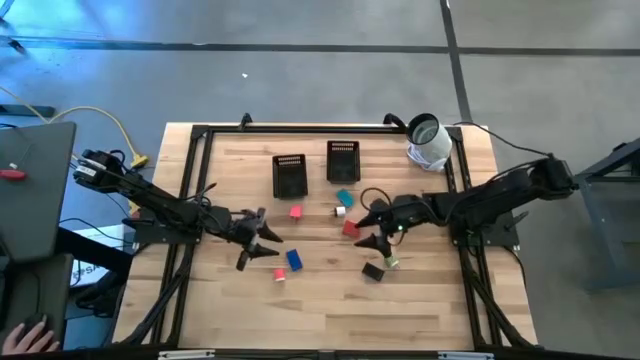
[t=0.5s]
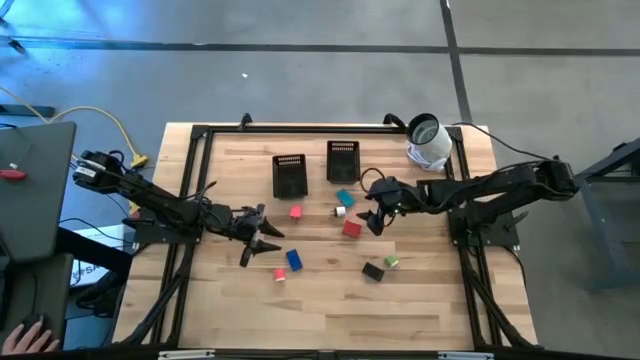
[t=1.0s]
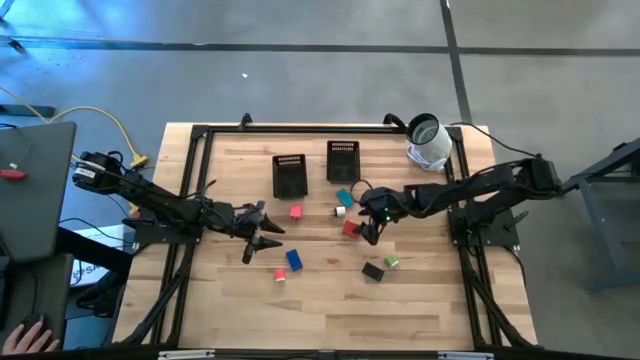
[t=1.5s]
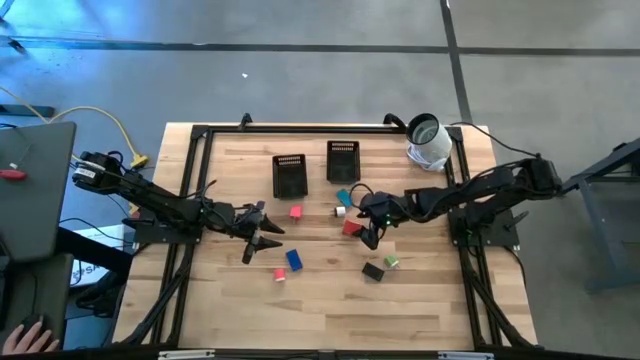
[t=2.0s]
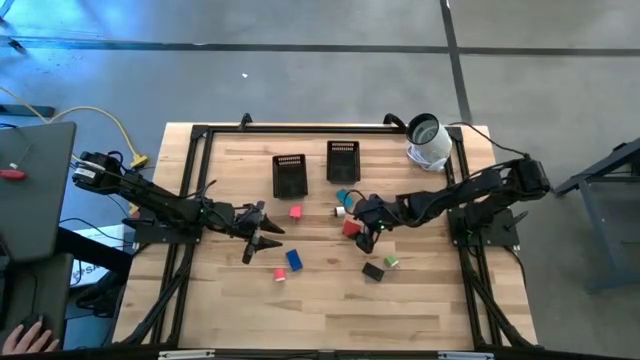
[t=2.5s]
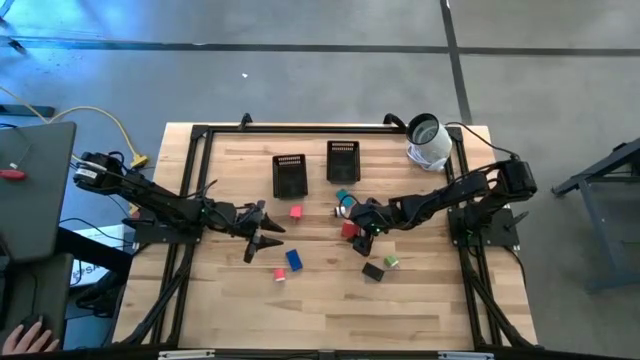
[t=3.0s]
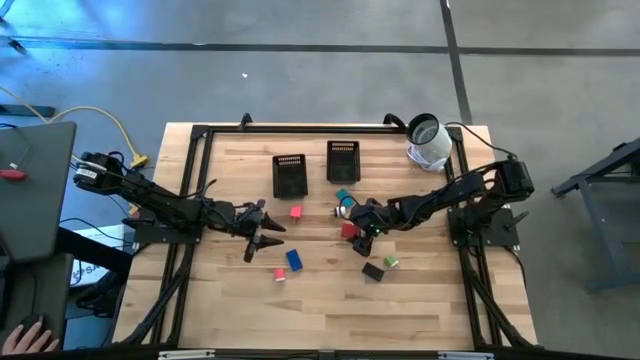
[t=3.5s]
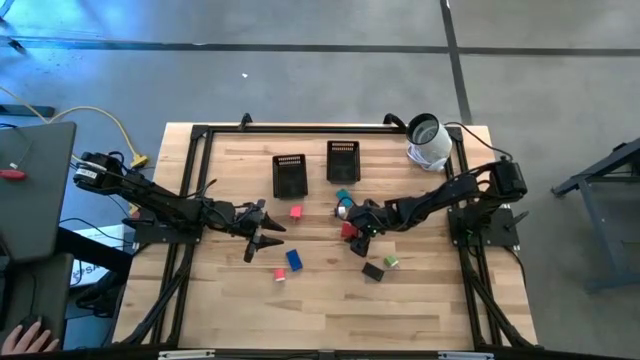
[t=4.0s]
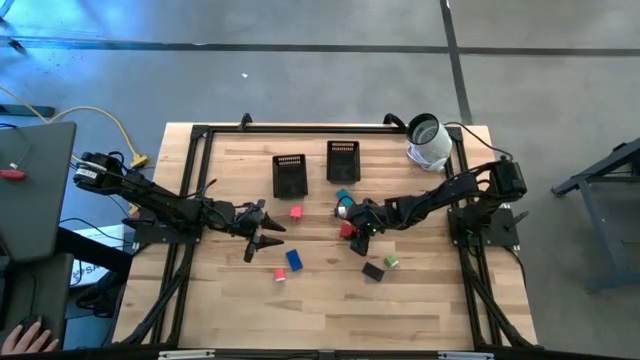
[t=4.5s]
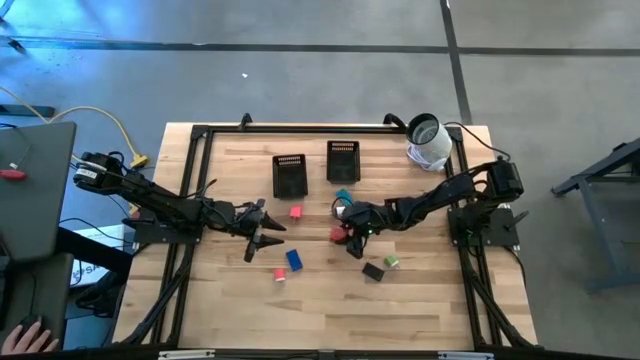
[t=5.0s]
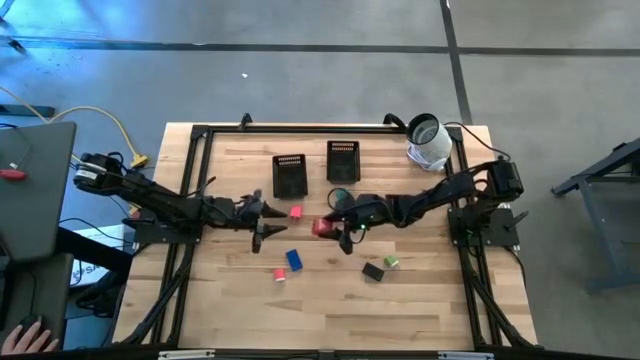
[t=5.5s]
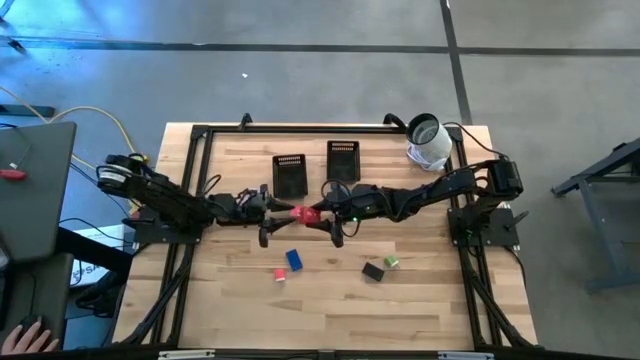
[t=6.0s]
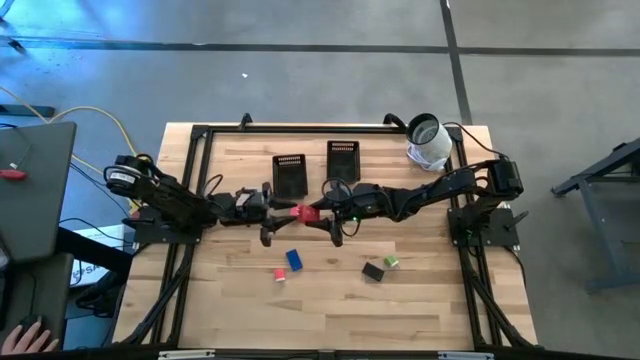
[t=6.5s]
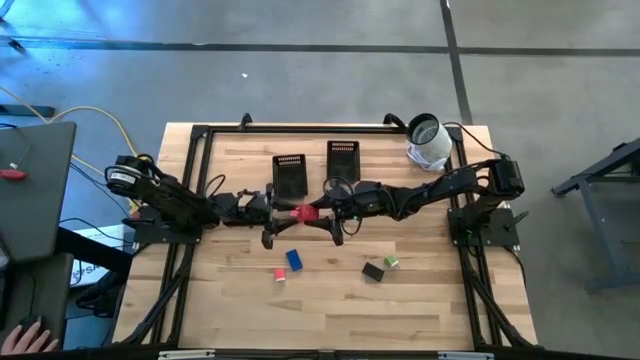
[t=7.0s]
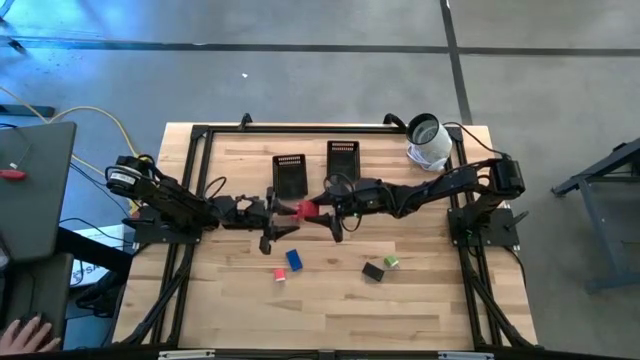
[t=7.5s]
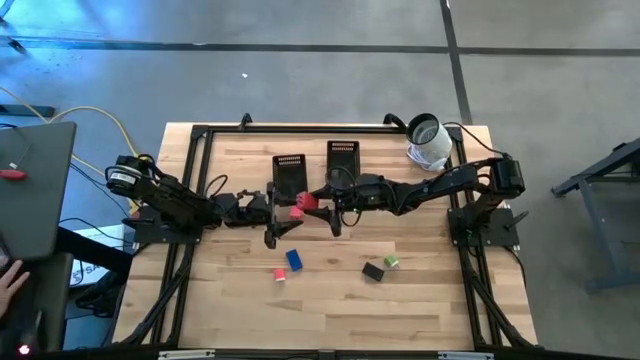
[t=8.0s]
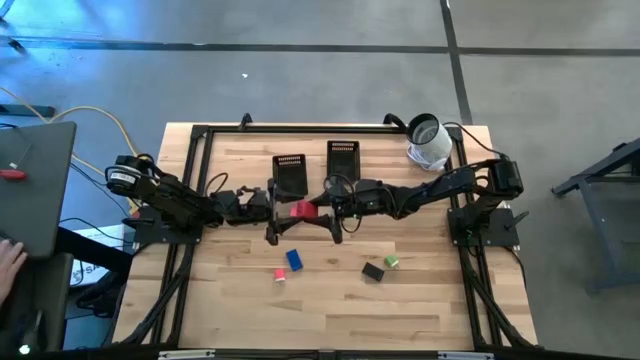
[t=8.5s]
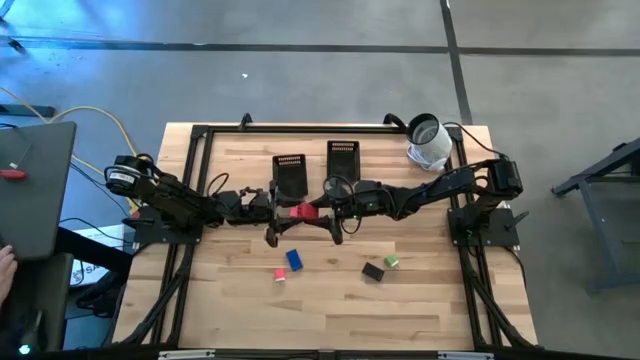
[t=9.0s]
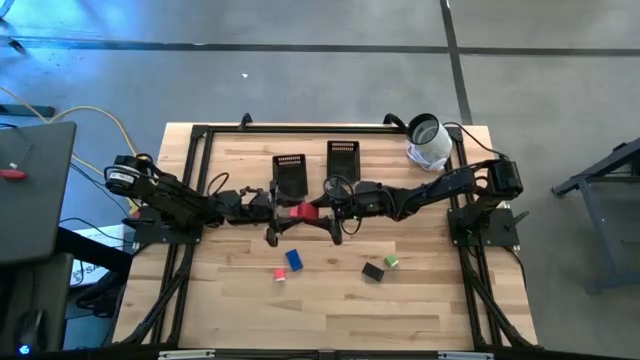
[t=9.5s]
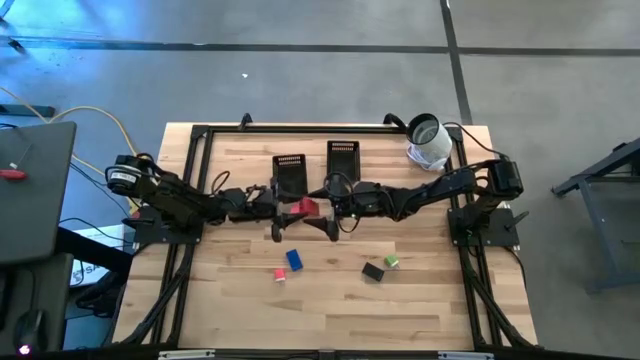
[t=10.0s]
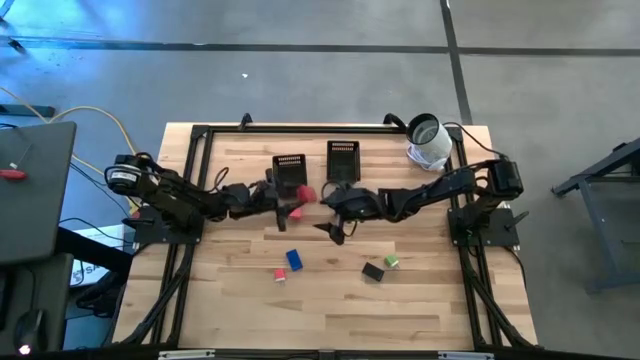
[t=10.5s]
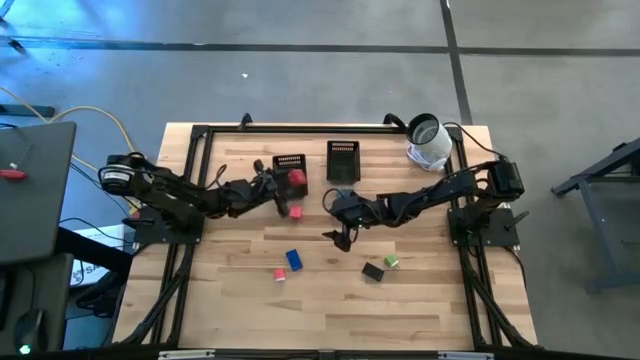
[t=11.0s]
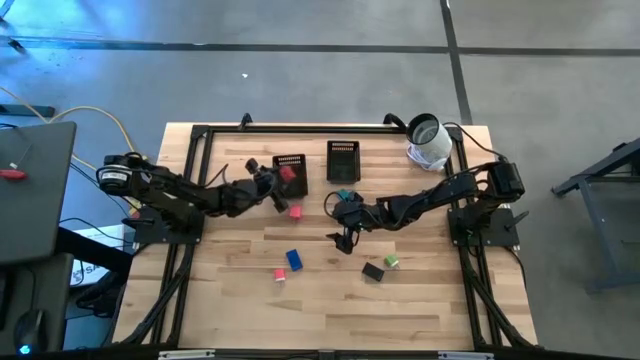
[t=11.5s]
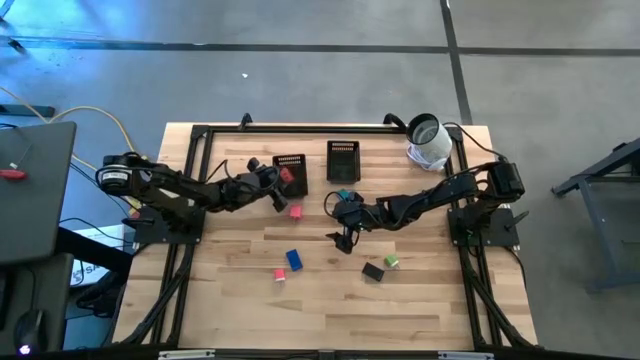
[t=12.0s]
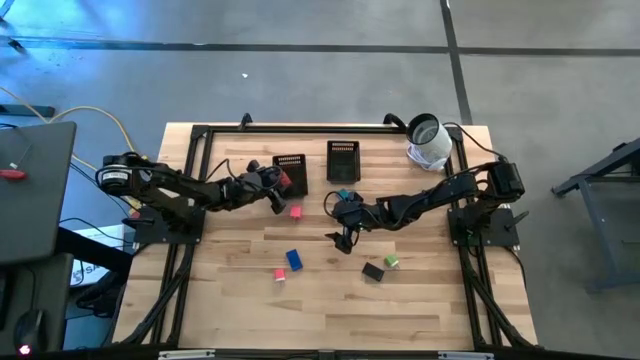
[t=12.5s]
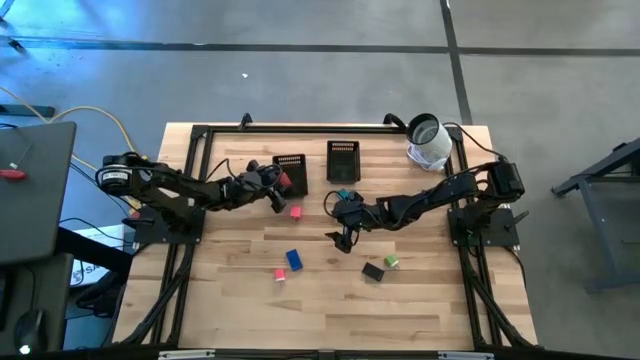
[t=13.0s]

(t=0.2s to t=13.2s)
Task: Pick & Place Office items
Put the red charger adapter into the left black bin

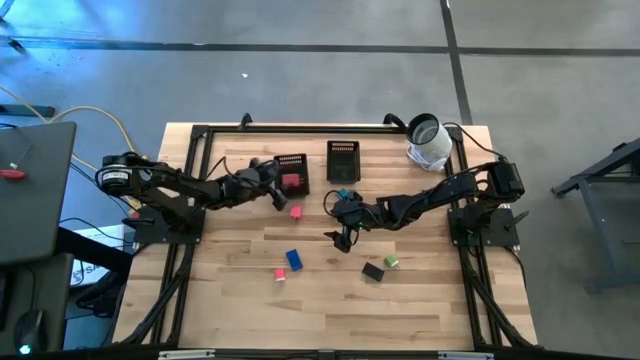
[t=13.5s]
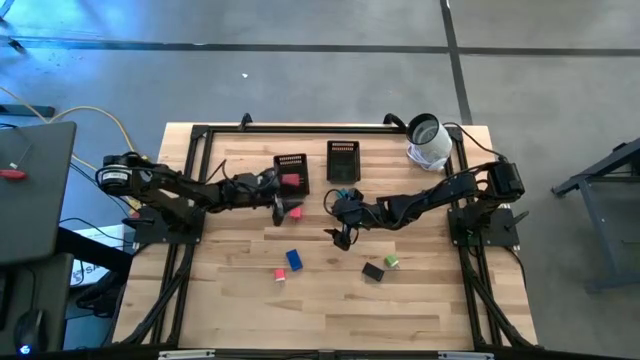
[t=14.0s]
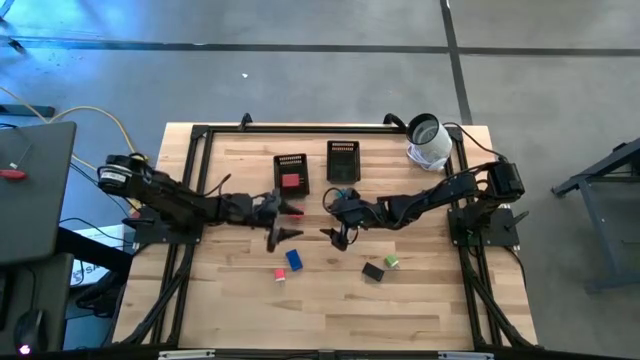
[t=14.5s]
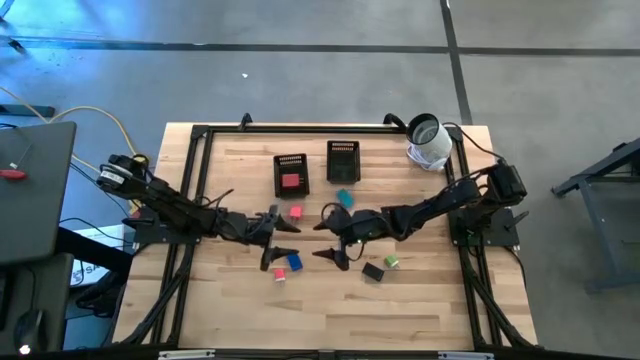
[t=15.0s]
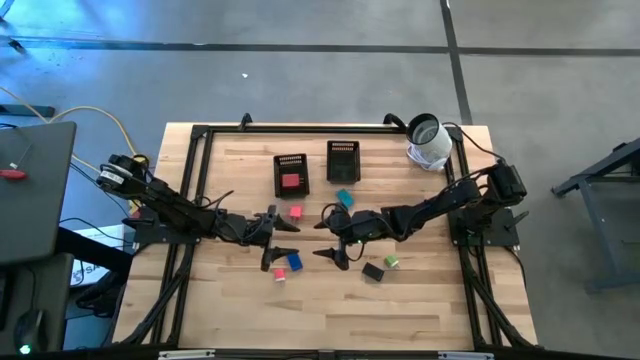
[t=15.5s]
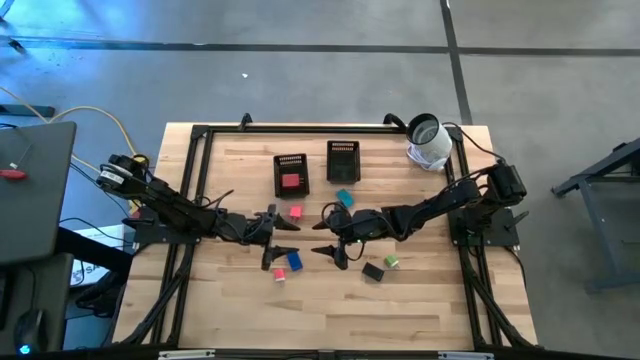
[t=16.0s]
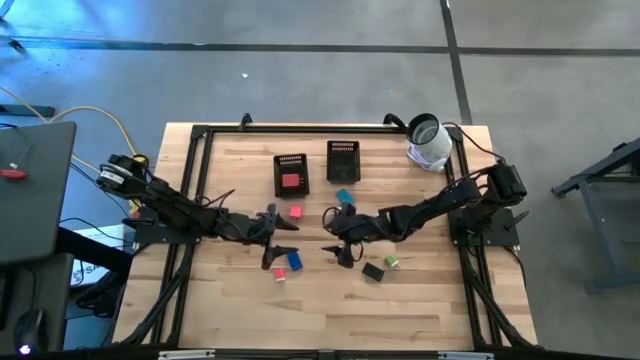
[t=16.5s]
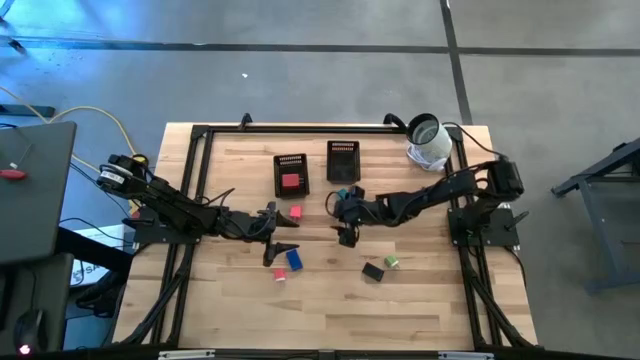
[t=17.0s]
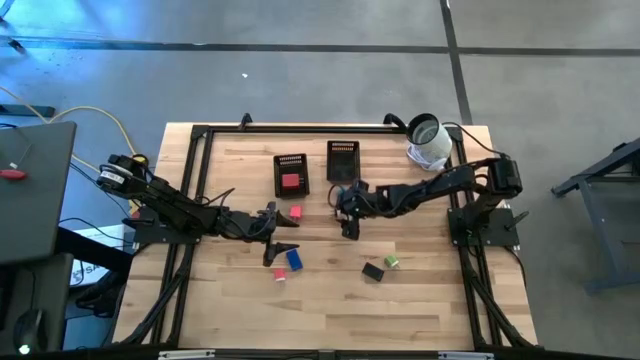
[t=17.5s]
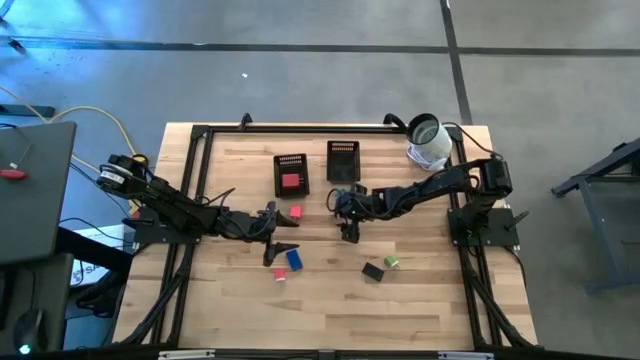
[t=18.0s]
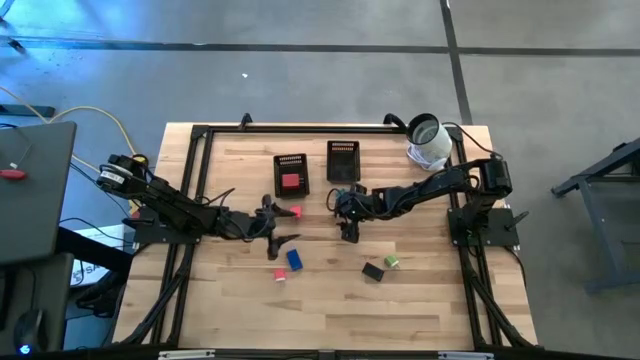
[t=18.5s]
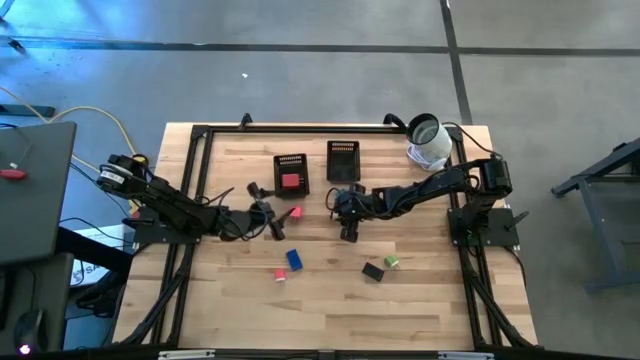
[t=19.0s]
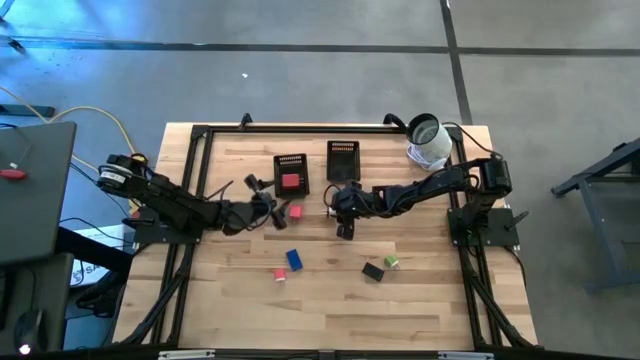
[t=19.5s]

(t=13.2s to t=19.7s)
Put the white charger adapter into the left black bin
